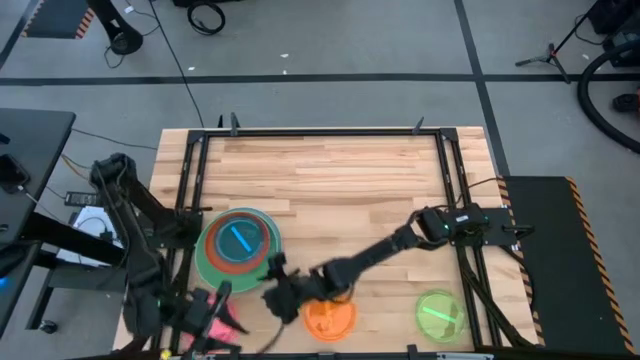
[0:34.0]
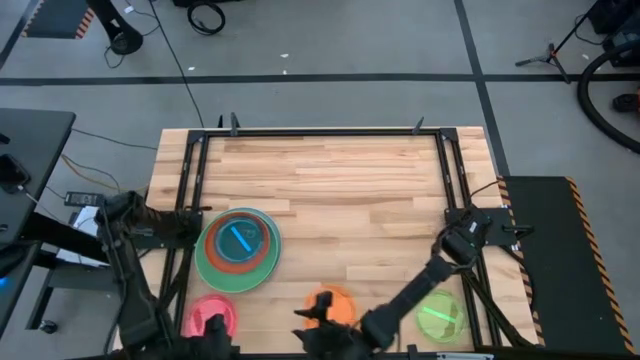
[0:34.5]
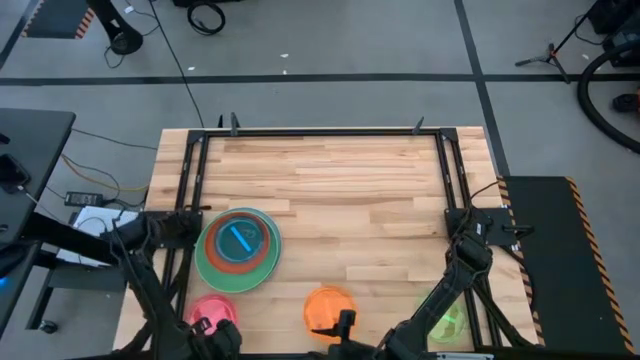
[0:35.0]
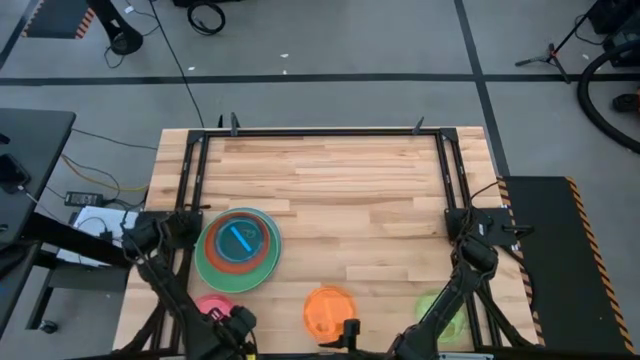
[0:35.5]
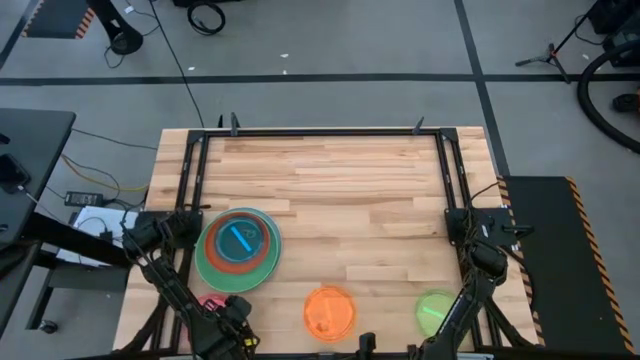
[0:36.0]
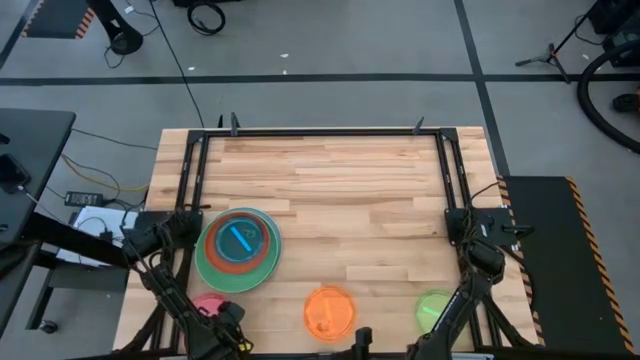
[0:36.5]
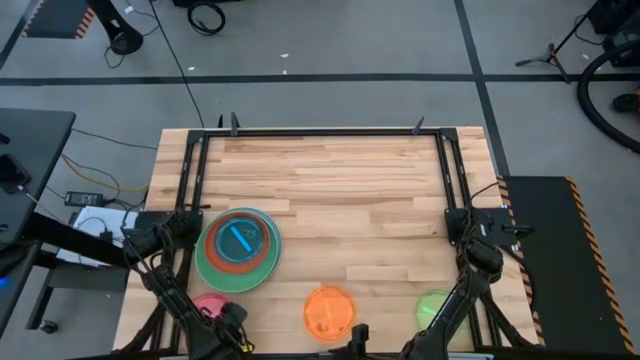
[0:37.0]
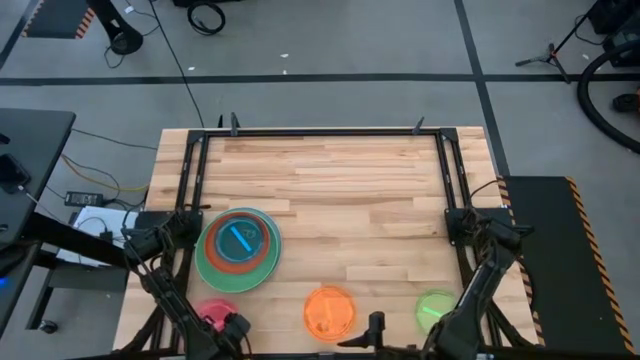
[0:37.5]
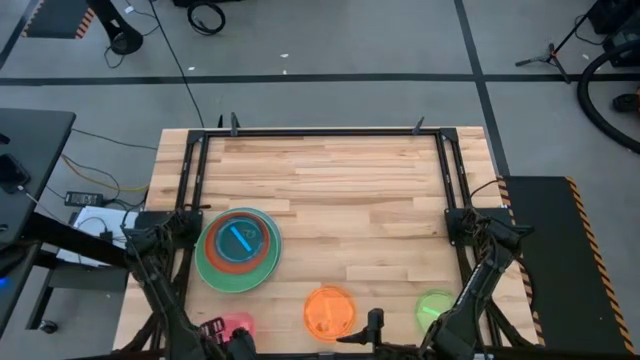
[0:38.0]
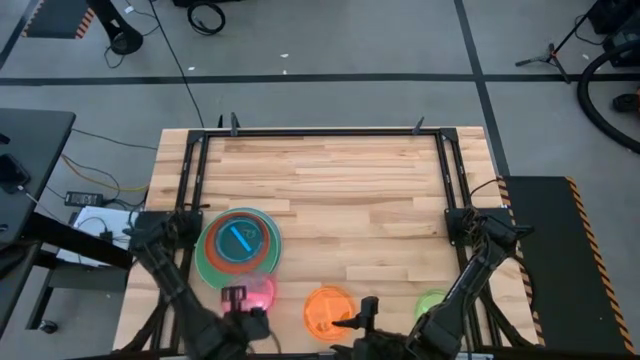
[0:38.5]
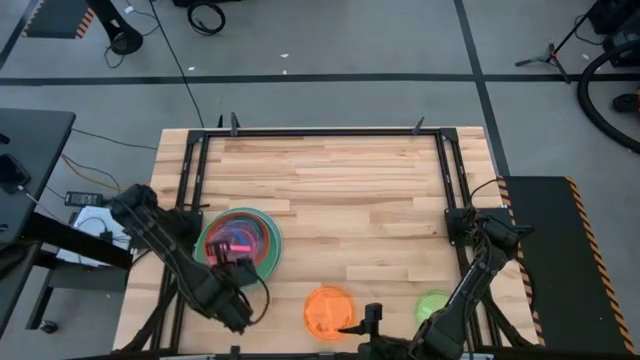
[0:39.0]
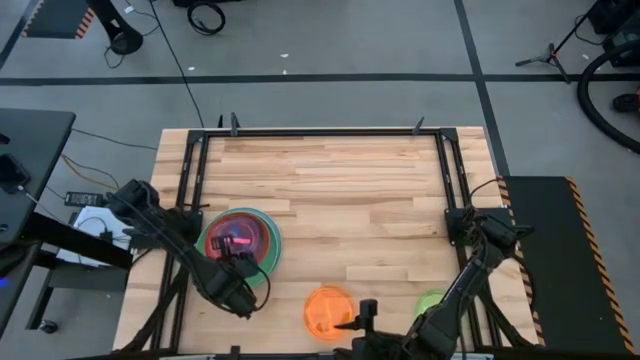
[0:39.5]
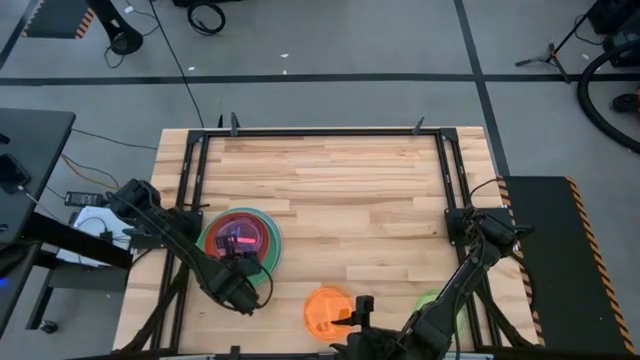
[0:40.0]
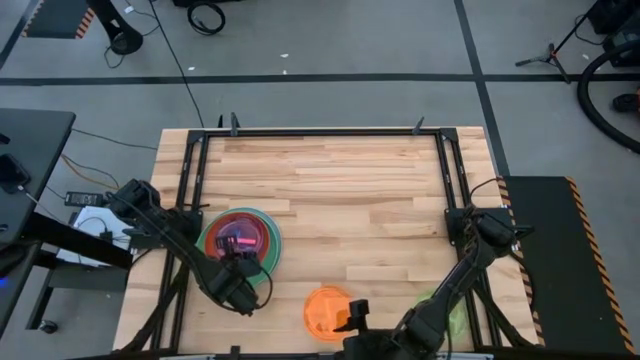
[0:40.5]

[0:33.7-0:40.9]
Task: Stack plastic plates
Stack the pink plate on top of the small light blue plate

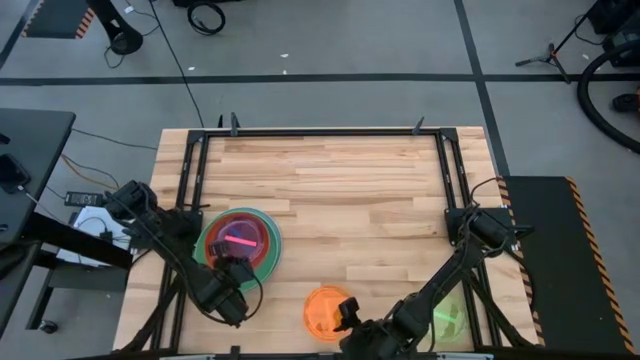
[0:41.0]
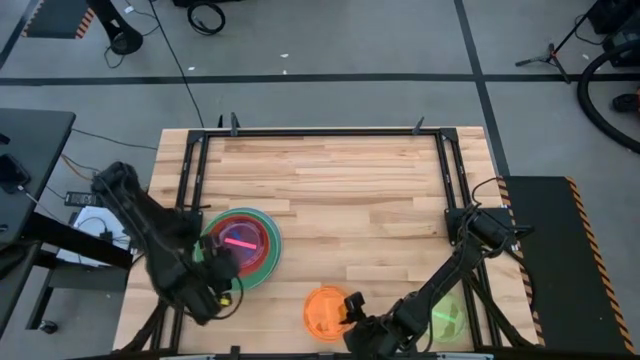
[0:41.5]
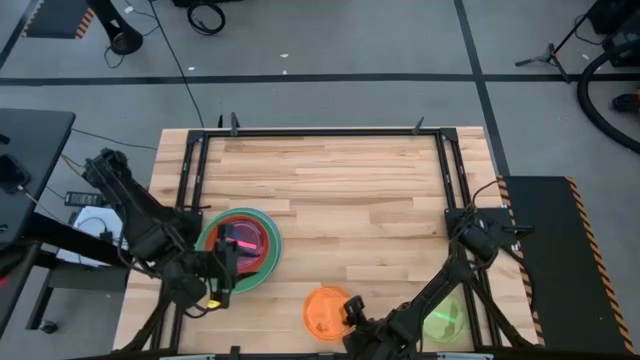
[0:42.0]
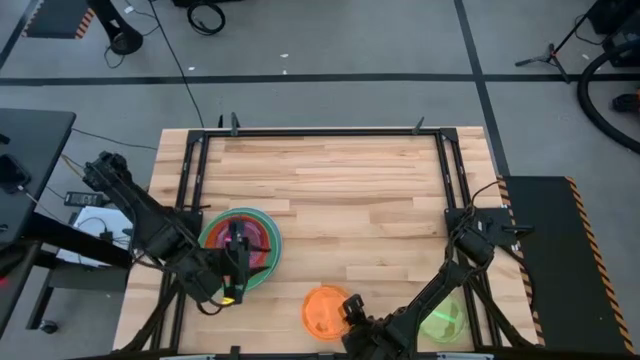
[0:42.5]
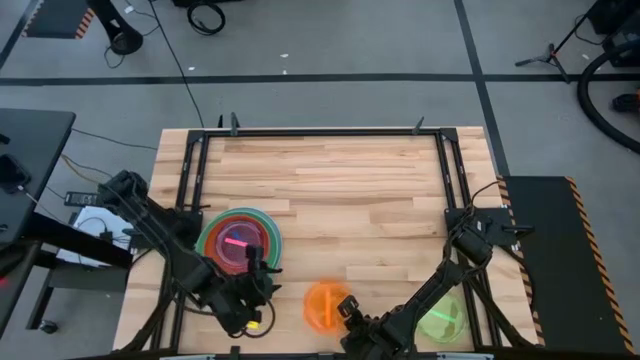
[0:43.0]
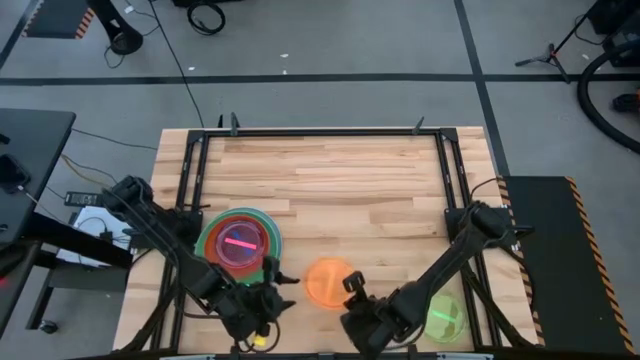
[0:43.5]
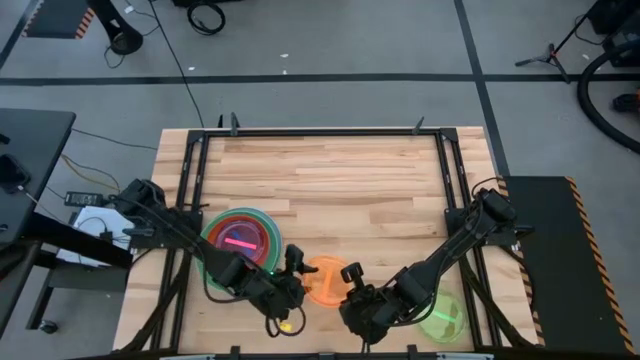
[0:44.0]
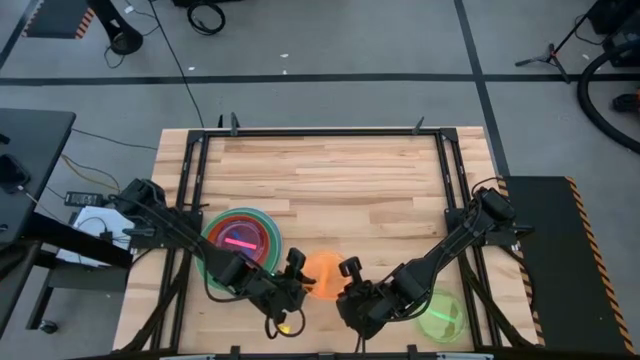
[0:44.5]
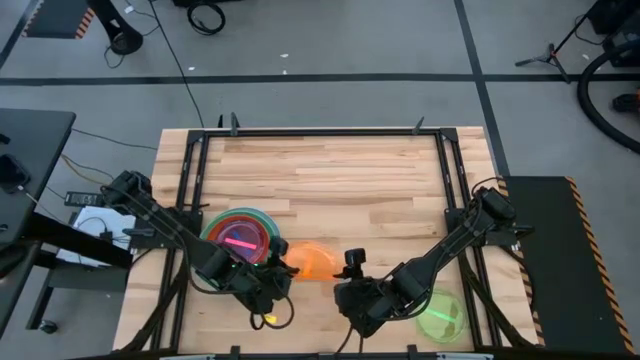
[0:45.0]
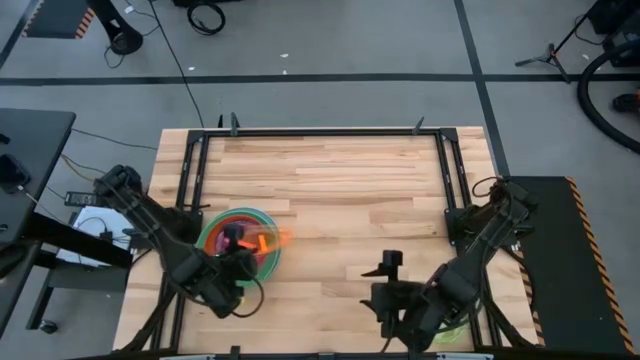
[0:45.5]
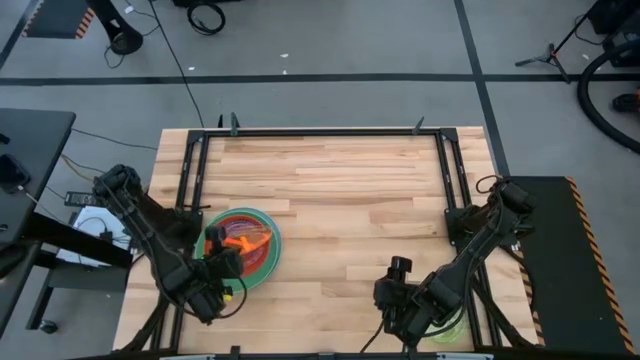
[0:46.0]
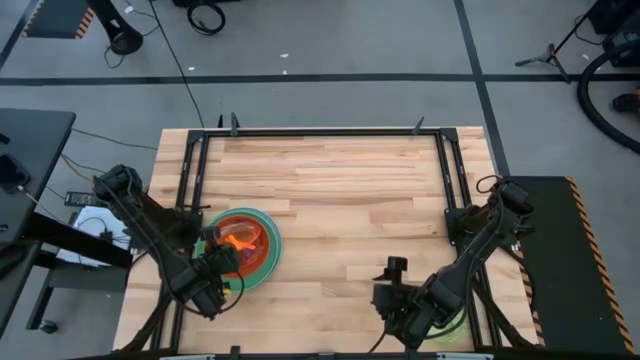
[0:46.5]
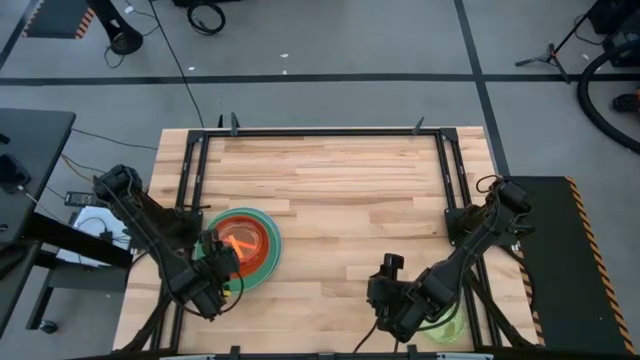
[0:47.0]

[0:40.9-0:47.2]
Stack the light orange plate on top of the pink plate

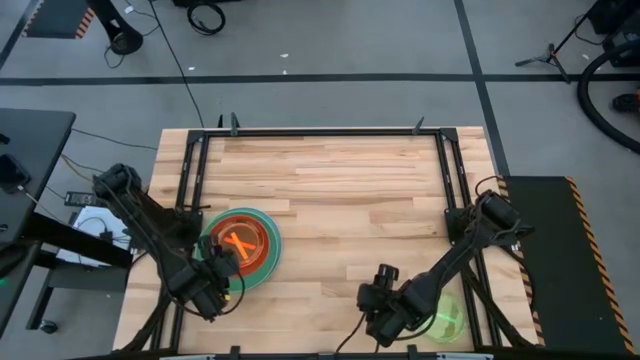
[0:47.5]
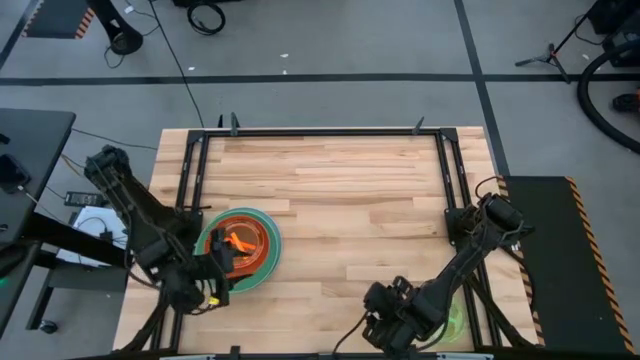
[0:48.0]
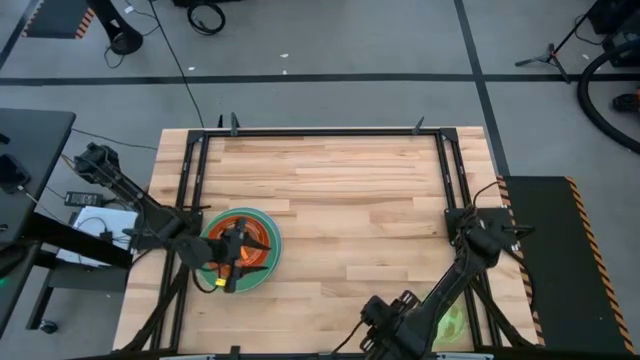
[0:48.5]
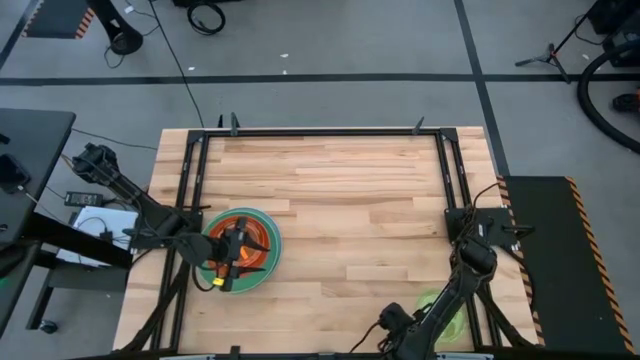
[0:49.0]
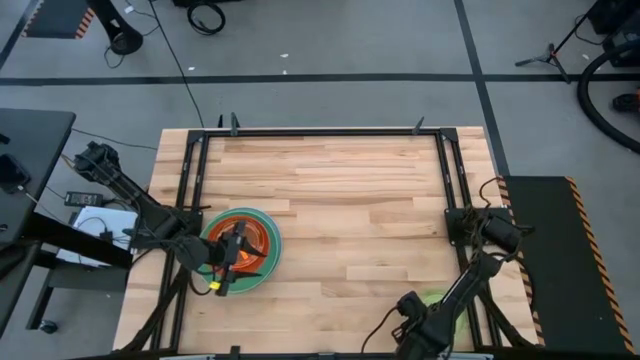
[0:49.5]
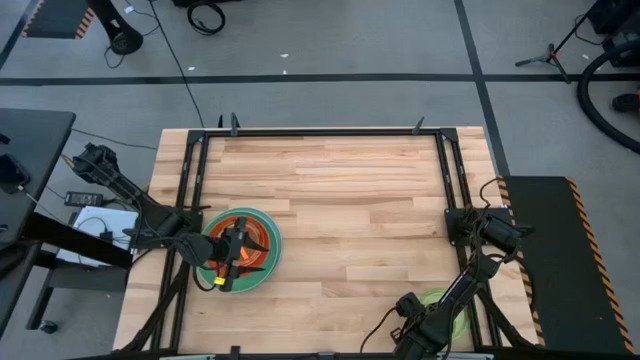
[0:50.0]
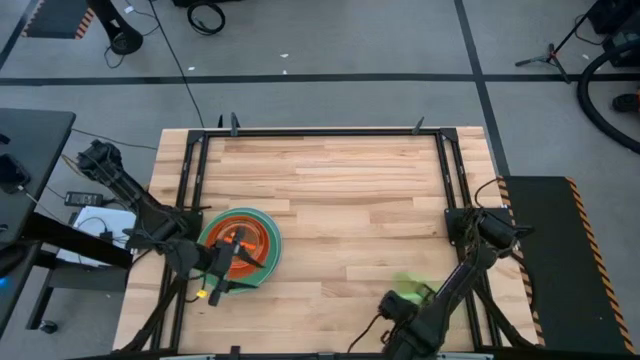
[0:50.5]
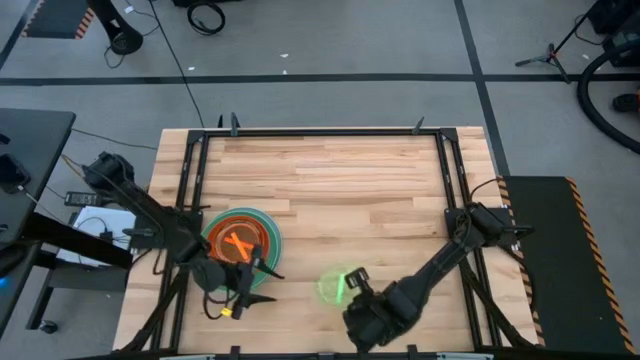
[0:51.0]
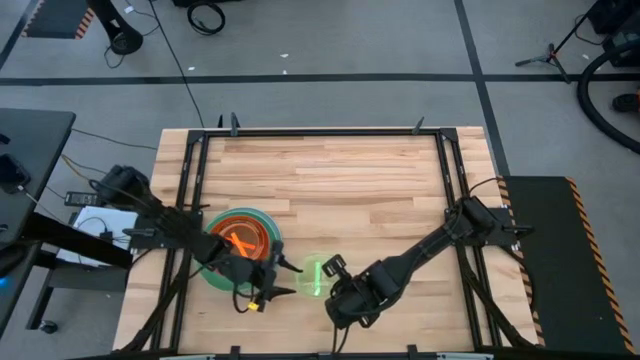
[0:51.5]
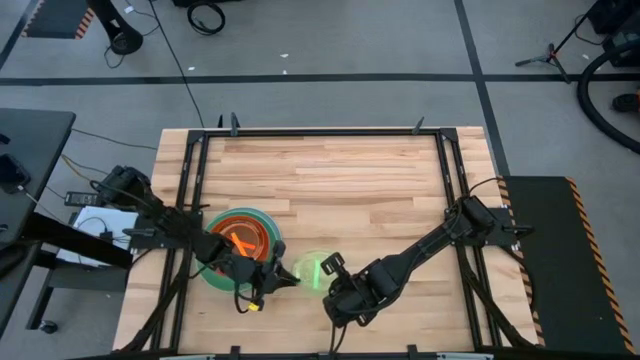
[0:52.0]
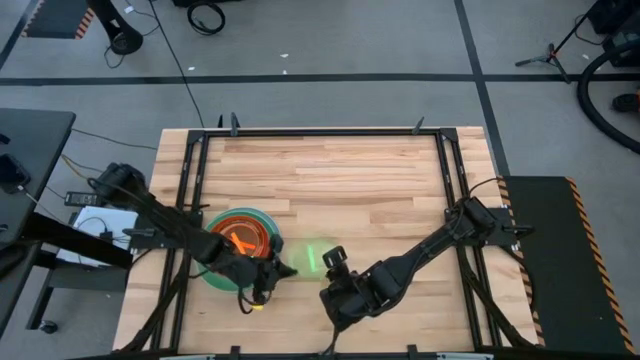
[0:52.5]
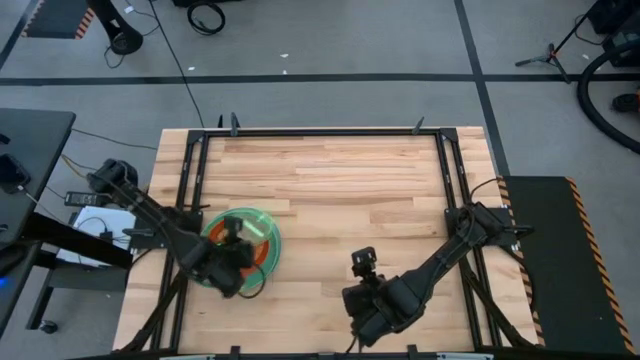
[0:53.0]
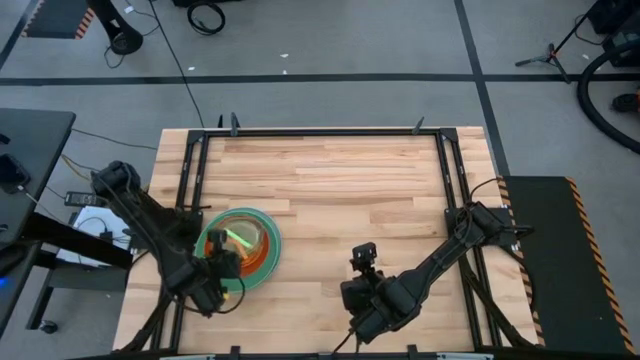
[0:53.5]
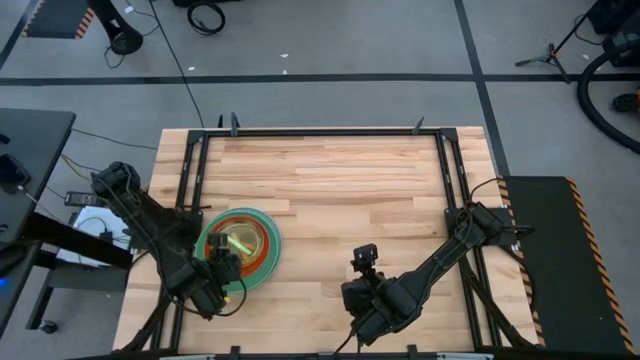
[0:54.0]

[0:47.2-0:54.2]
Stack the light green plate on top of the light orange plate
